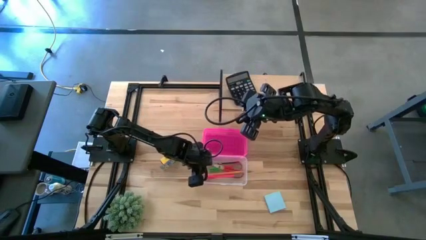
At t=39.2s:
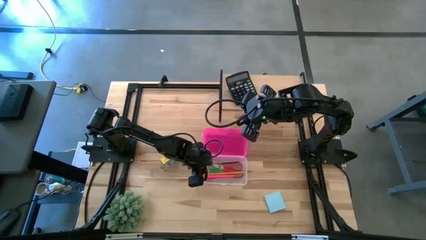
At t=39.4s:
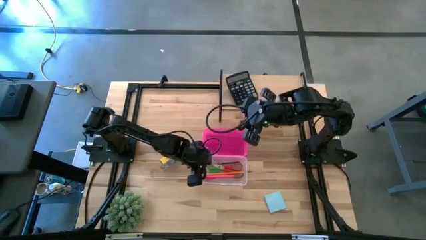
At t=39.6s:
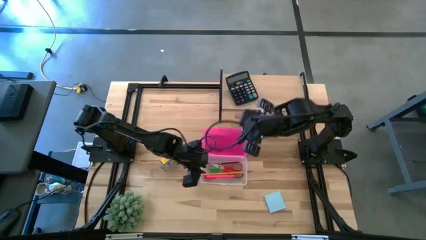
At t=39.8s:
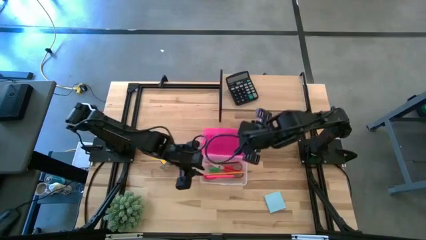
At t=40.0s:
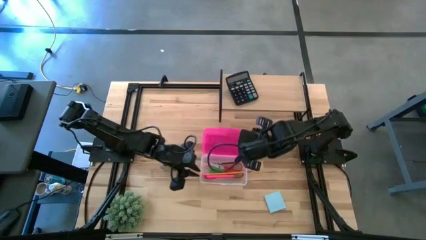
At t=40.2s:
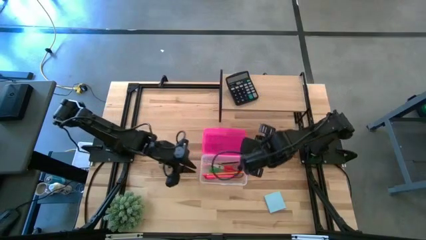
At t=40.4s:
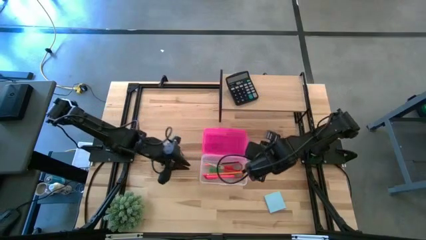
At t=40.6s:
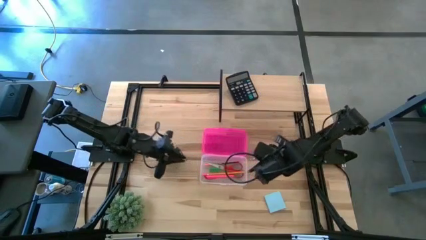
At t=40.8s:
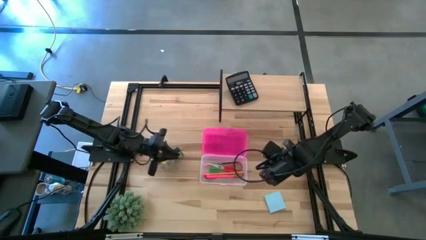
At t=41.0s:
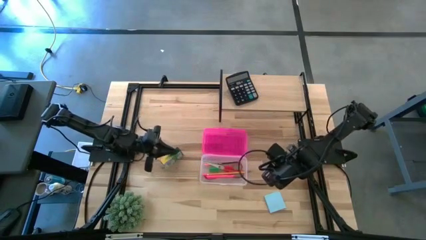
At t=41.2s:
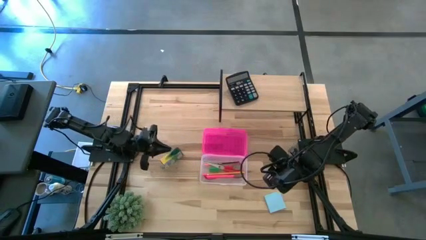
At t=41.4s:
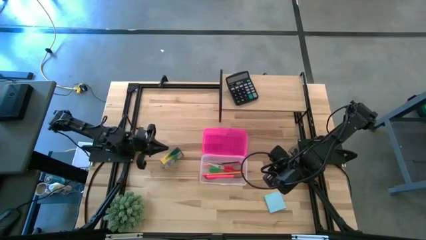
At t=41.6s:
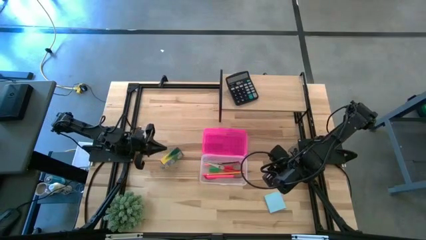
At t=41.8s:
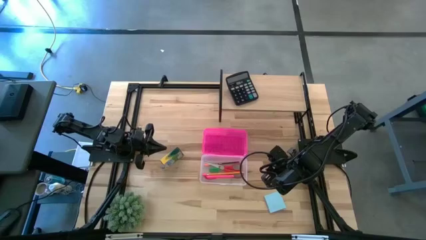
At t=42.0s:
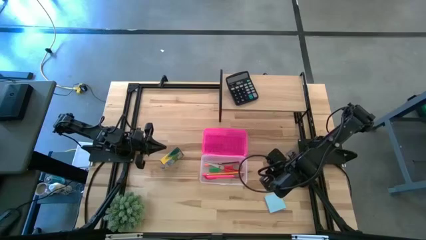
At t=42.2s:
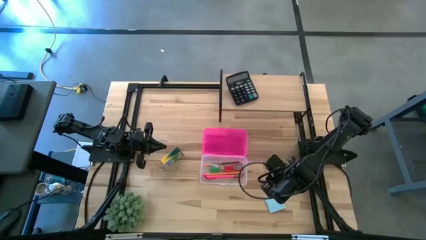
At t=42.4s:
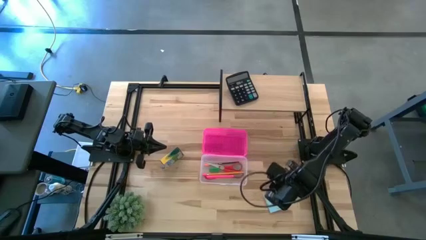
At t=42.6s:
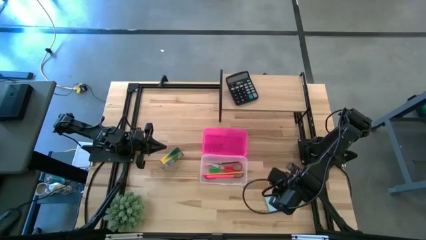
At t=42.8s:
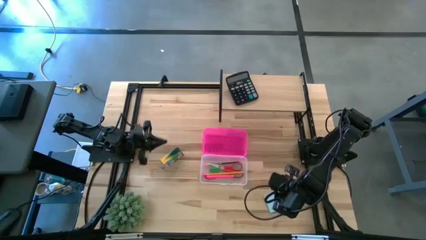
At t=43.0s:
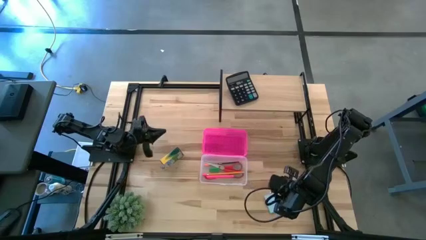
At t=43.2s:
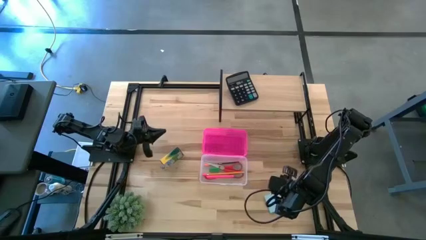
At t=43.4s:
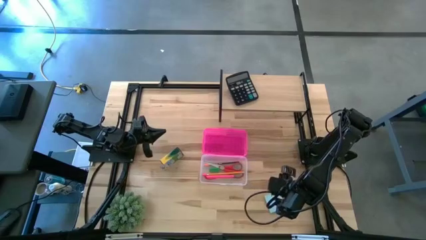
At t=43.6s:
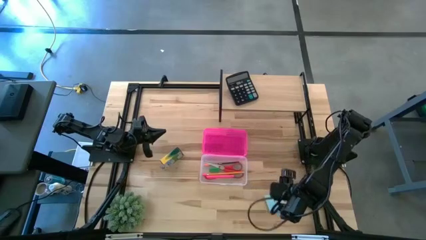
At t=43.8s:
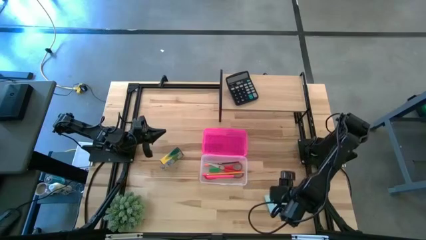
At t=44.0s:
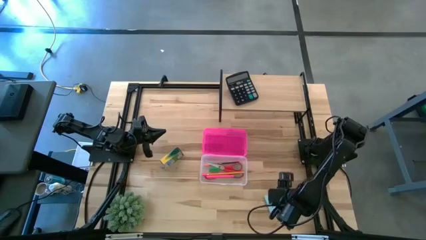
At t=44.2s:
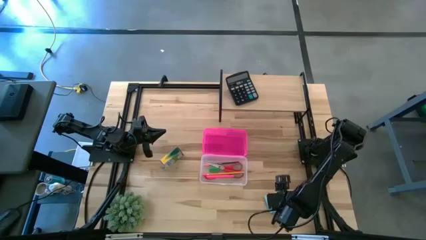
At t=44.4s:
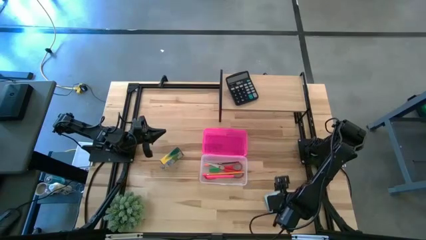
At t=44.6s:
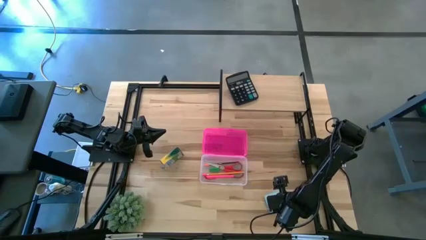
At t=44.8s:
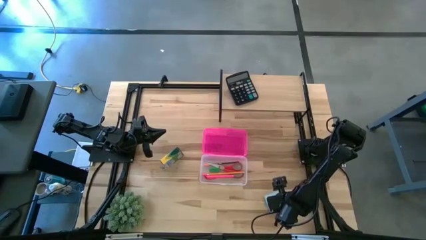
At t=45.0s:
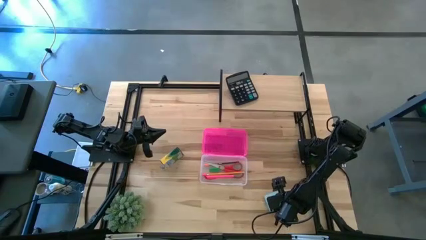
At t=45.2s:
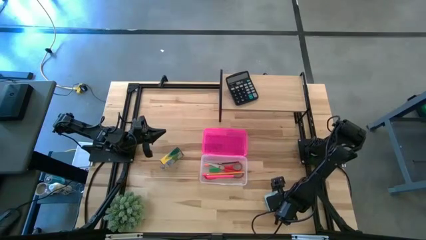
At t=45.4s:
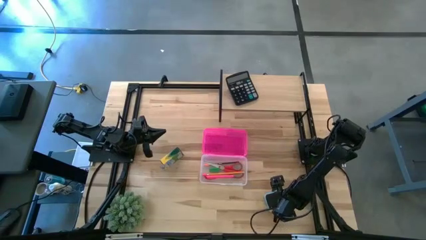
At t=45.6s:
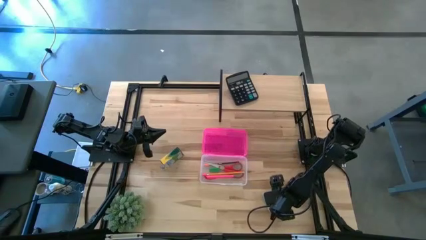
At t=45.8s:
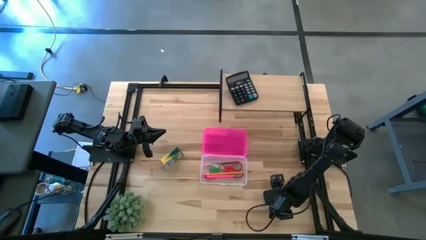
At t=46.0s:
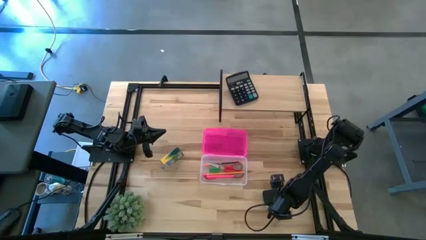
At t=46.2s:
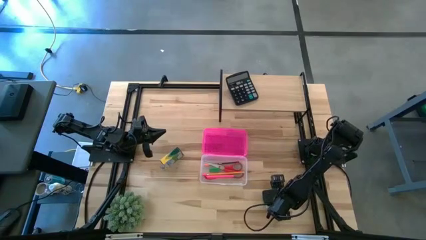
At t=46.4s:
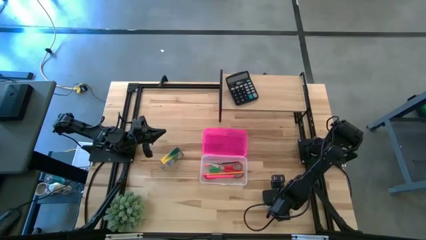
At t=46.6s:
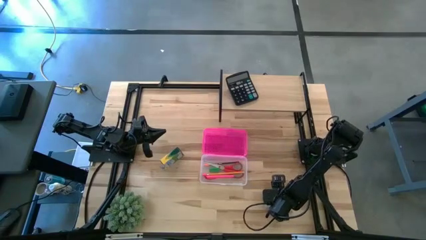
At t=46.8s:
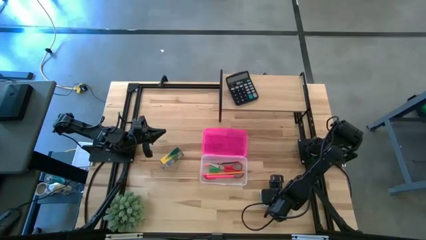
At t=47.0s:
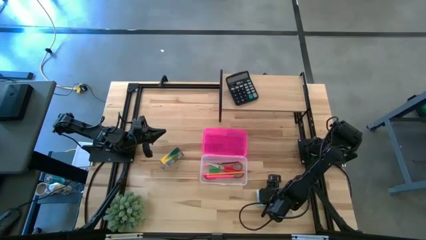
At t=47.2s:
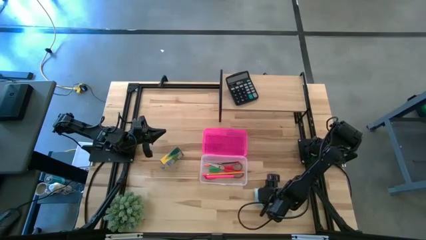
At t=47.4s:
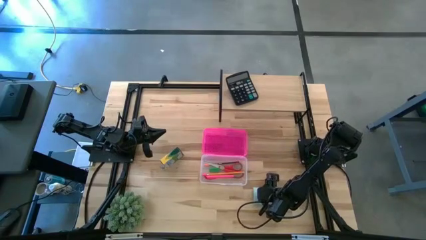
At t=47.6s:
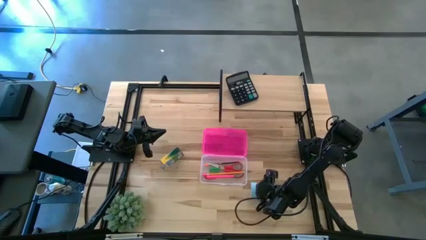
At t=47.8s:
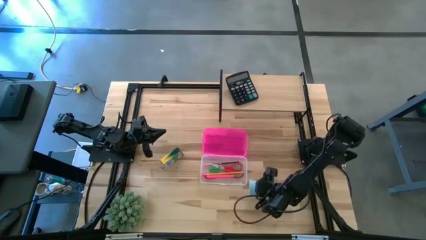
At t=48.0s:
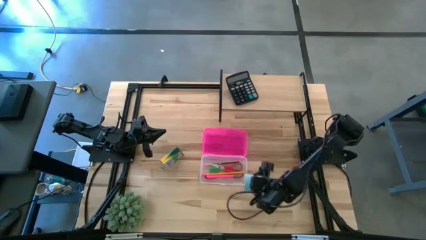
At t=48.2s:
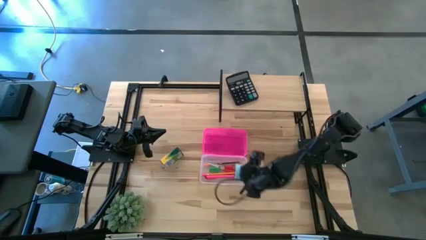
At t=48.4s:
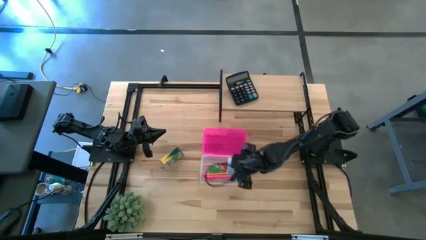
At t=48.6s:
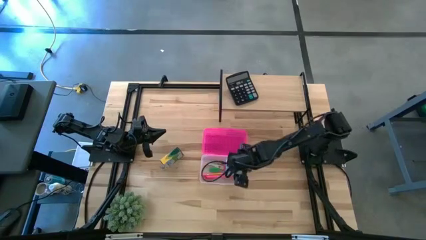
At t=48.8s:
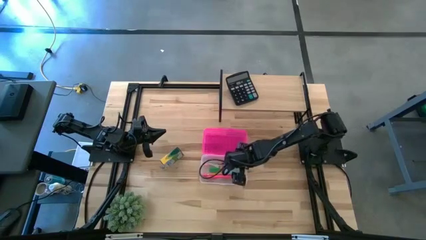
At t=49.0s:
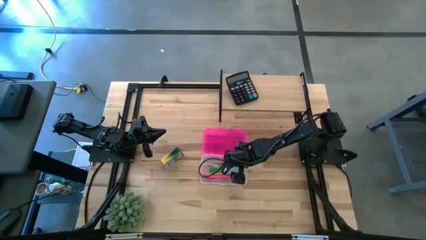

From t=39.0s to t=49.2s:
Task: Pack school essentials
Put the sticky notes into the supply box
